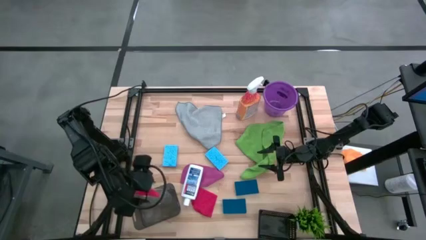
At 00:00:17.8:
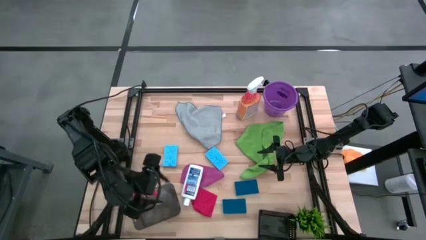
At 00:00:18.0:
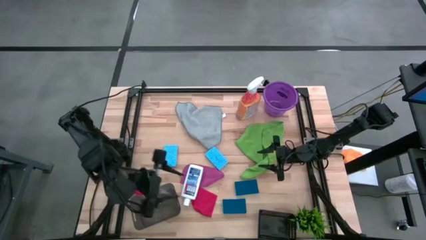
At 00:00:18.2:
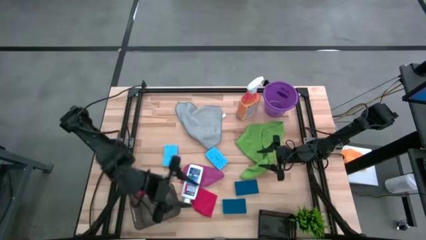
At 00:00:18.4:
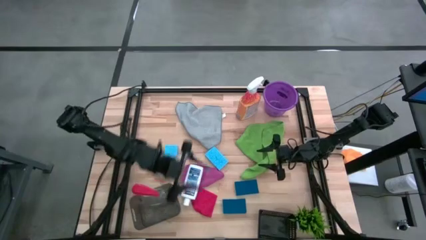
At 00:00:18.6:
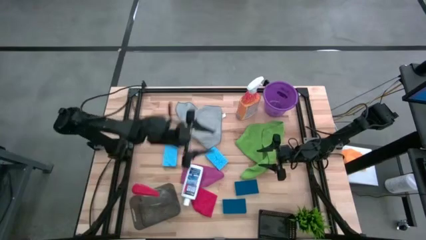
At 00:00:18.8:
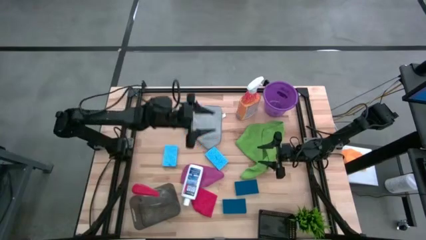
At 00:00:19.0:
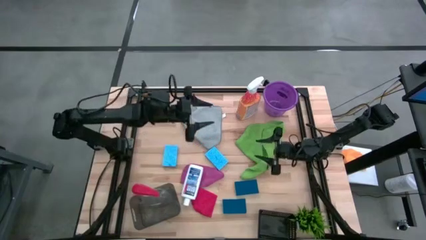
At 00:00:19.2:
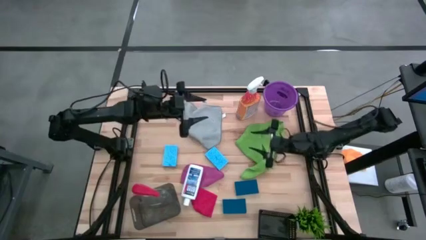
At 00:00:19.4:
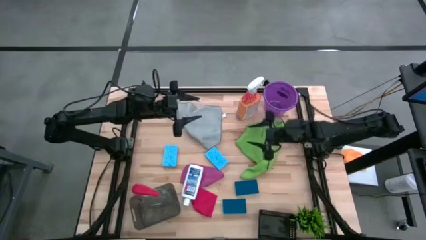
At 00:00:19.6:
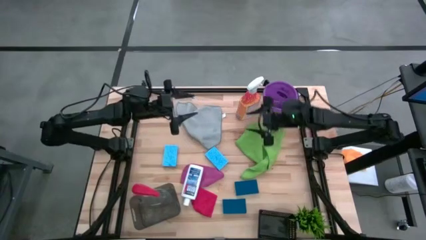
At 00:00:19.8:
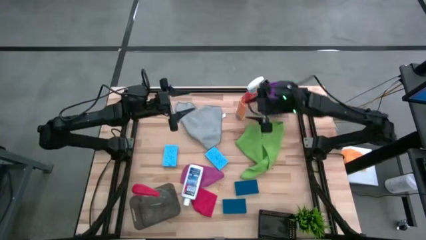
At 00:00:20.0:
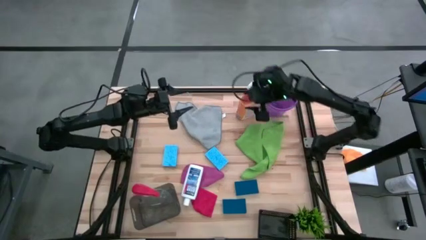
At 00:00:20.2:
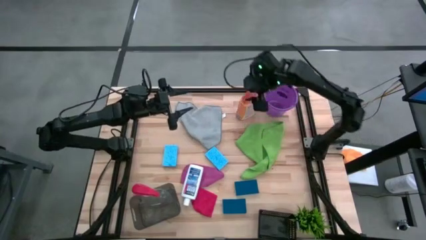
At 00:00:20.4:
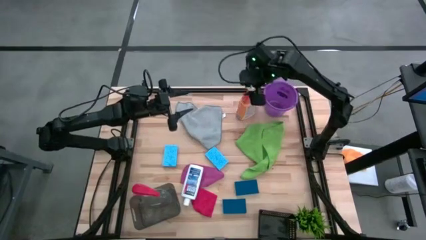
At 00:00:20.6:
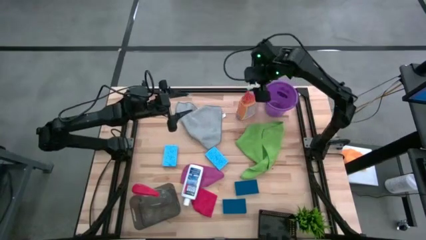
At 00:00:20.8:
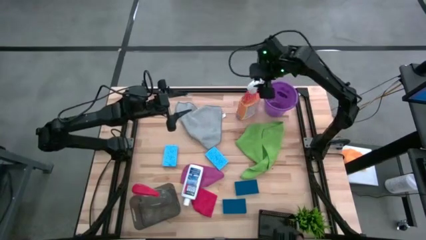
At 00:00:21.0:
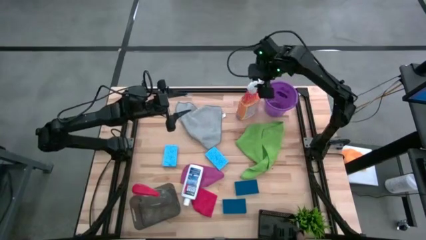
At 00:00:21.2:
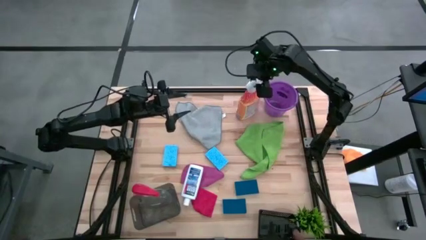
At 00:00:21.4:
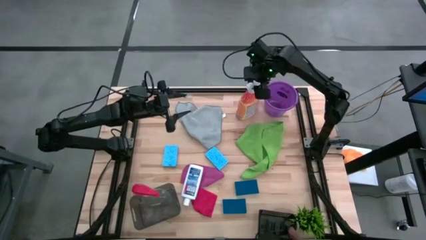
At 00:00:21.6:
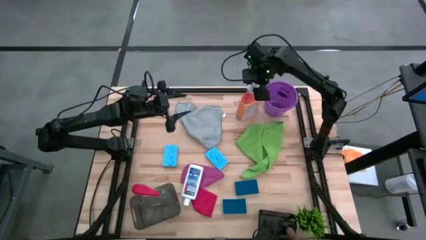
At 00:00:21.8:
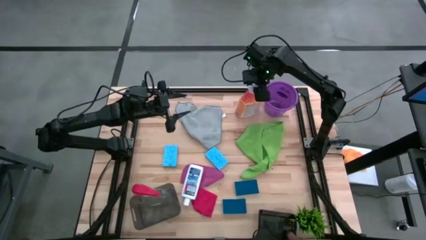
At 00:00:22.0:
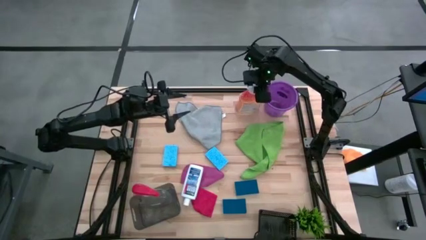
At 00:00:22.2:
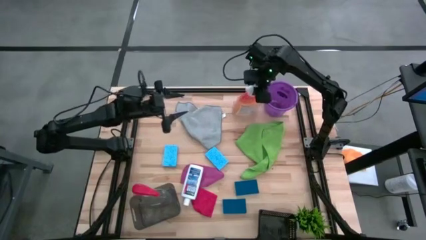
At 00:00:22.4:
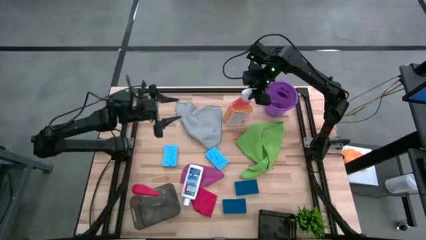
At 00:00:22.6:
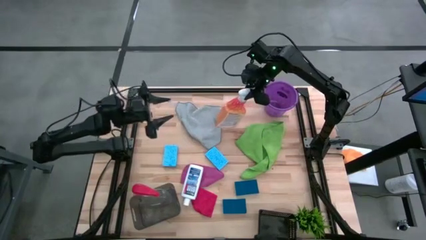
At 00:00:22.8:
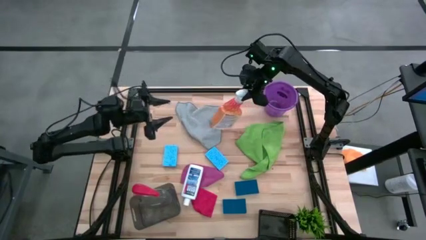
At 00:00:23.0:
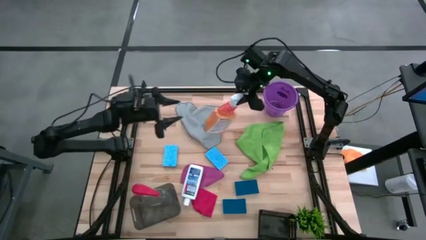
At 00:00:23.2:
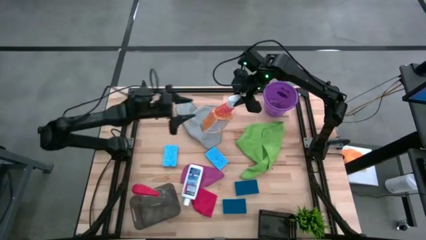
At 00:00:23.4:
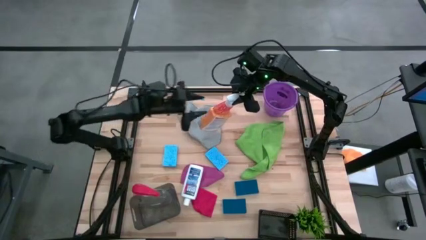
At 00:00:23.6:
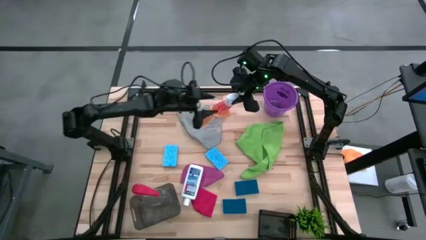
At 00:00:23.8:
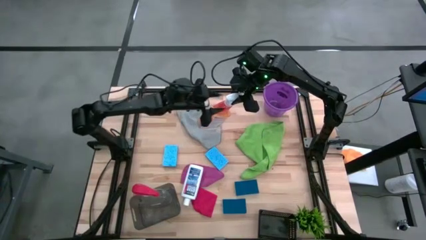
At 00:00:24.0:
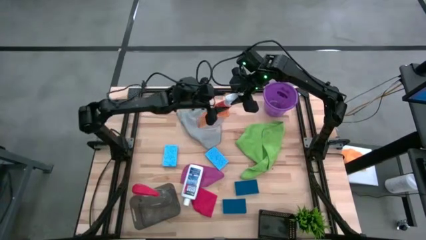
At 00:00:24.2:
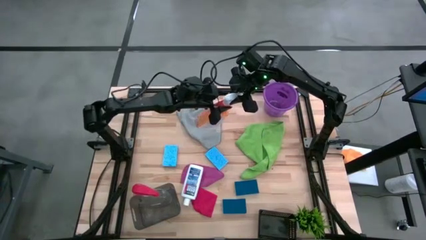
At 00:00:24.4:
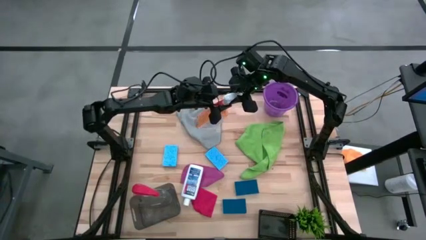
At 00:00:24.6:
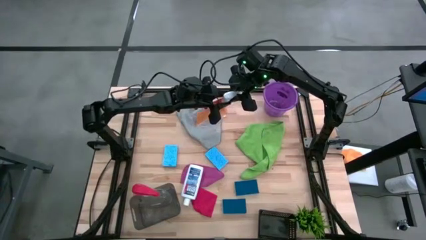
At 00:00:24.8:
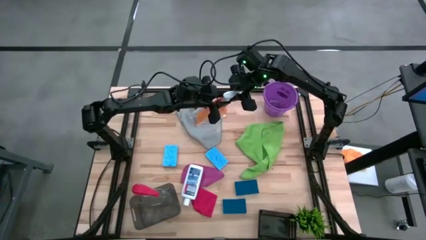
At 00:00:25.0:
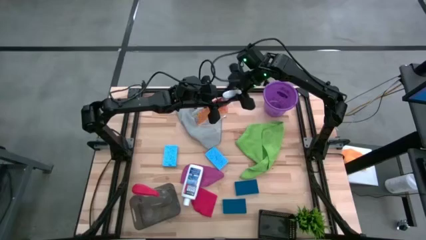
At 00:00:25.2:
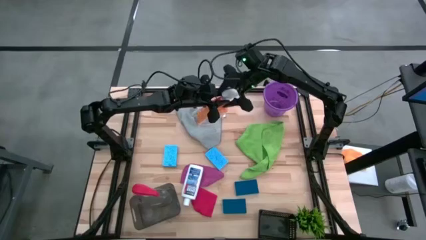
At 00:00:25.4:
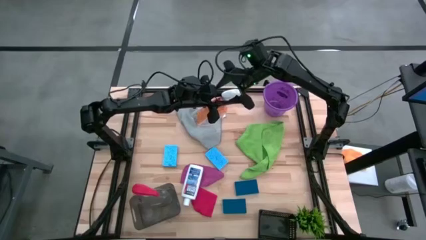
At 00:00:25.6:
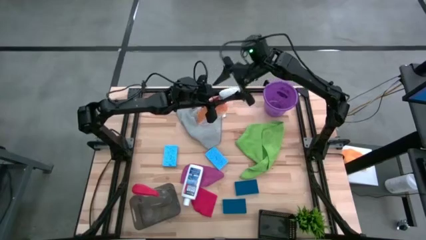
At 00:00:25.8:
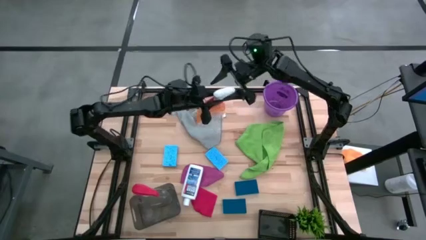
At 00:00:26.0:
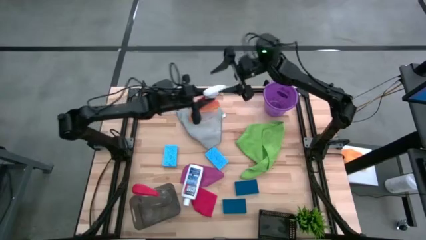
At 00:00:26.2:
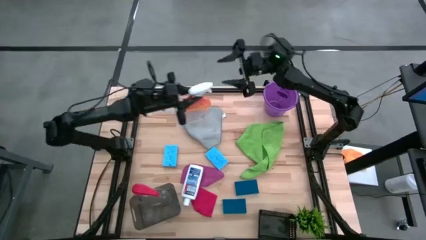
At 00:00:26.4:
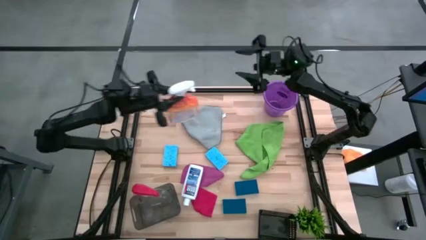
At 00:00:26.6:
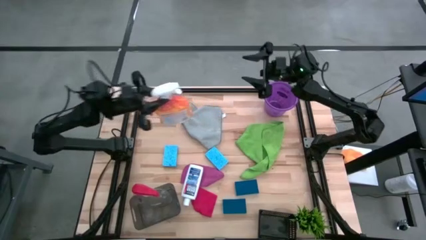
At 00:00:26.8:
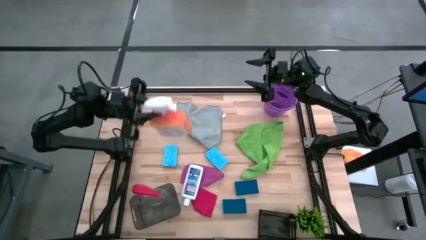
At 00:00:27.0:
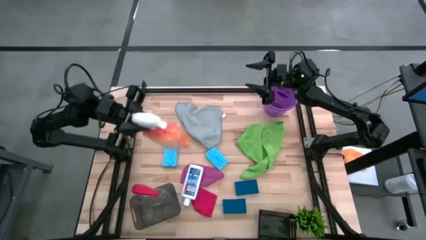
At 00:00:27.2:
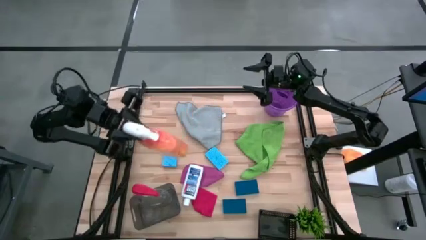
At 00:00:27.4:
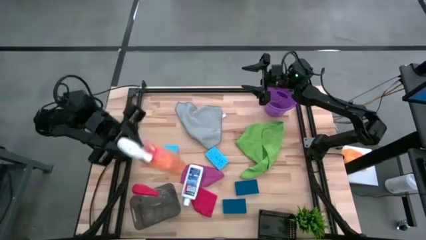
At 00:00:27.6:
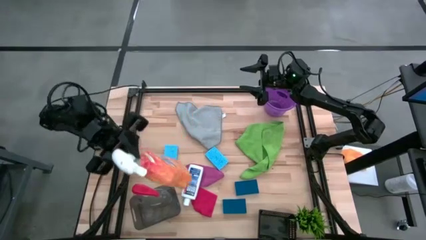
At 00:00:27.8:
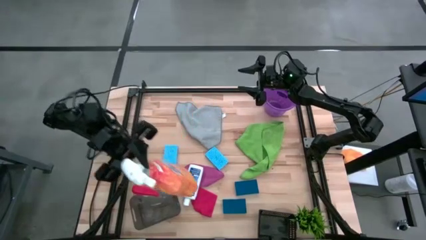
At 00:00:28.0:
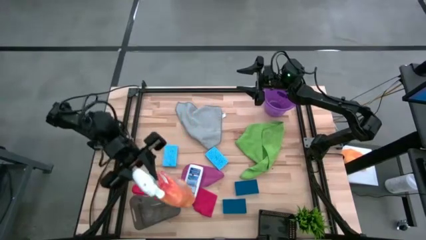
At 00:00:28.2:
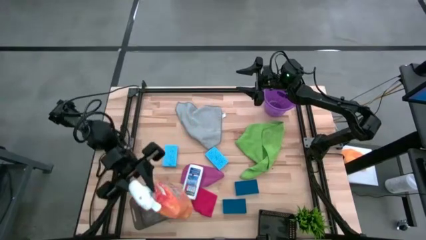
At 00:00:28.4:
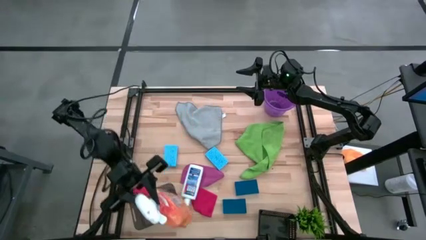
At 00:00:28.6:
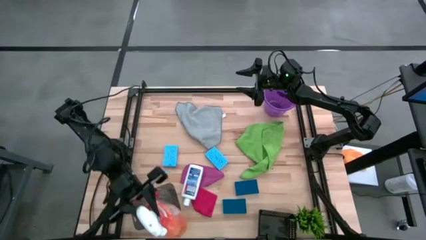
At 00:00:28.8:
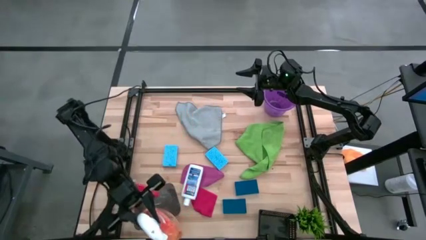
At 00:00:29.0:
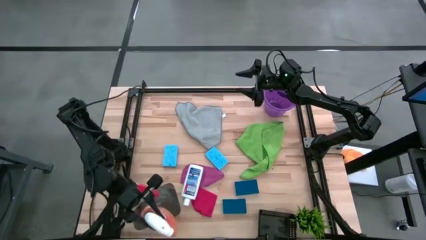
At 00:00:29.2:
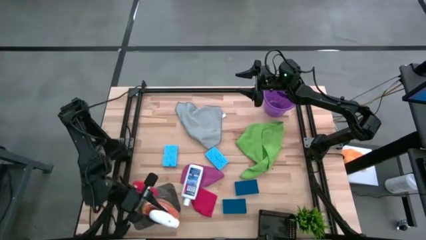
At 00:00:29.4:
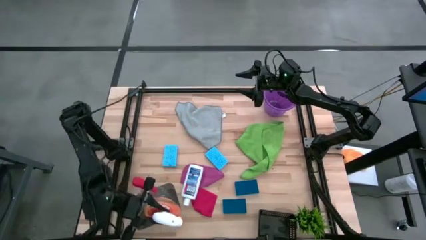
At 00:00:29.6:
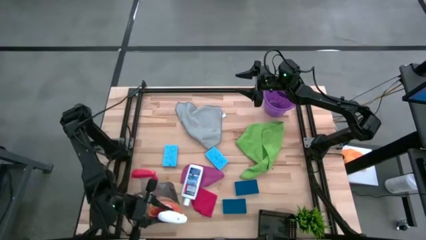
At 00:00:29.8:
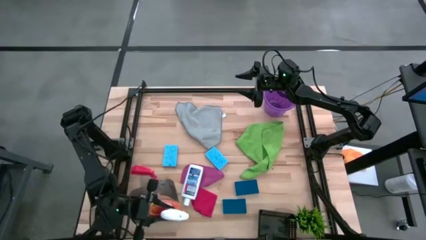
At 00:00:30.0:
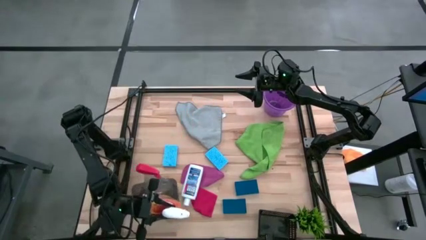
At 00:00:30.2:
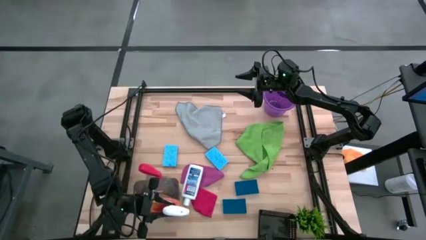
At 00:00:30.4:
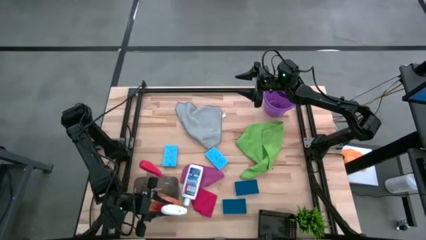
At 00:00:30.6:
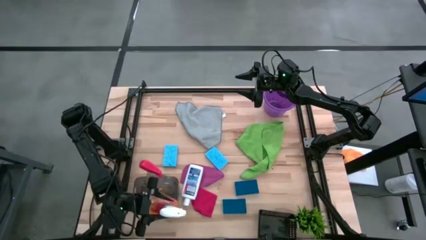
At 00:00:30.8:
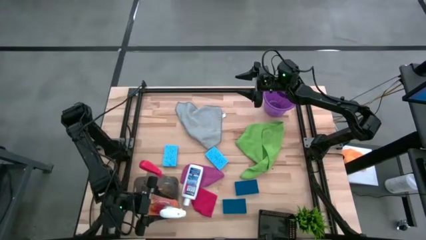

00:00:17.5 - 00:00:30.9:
Task: Pick & Place Kitchen Items
Put the orange spray bottle into the gray bin
